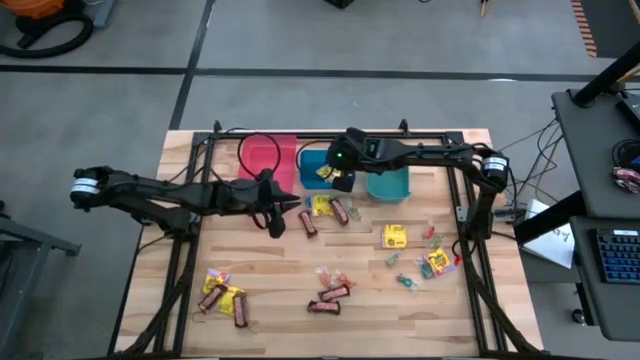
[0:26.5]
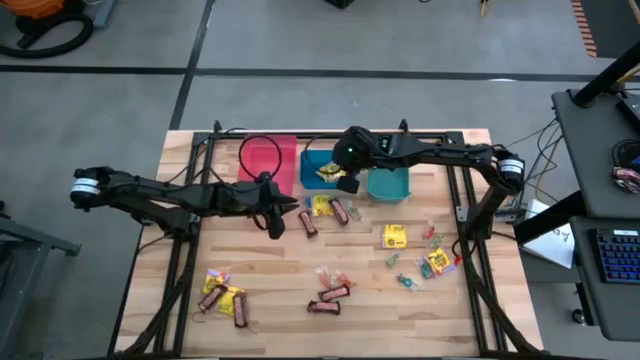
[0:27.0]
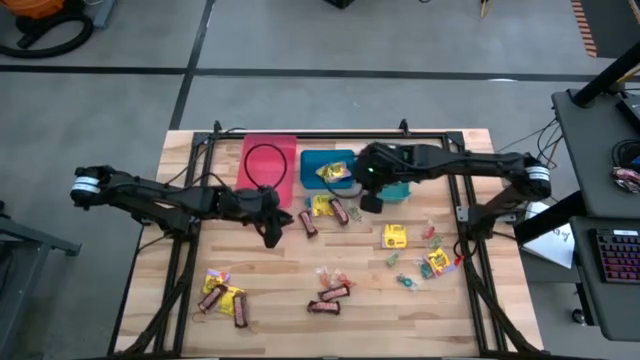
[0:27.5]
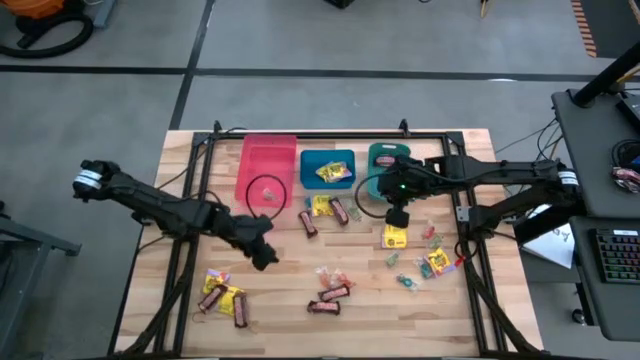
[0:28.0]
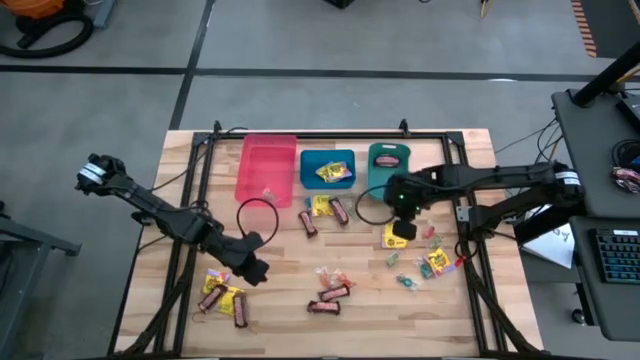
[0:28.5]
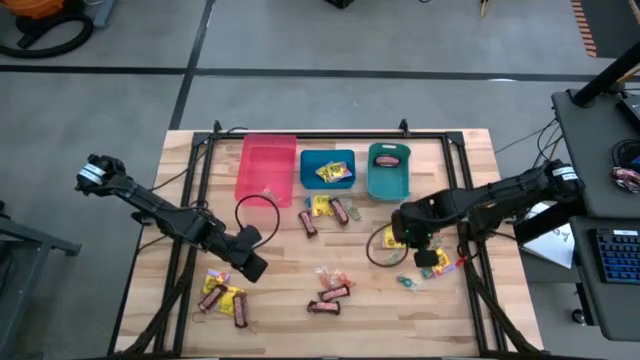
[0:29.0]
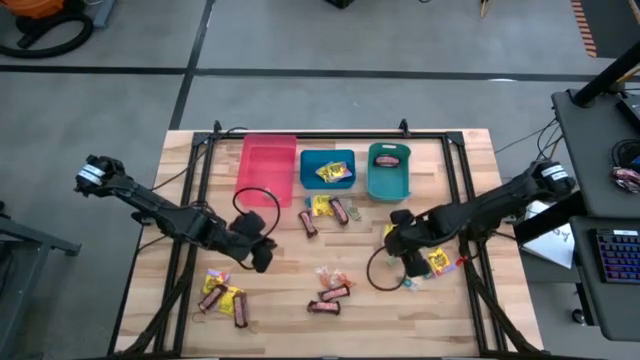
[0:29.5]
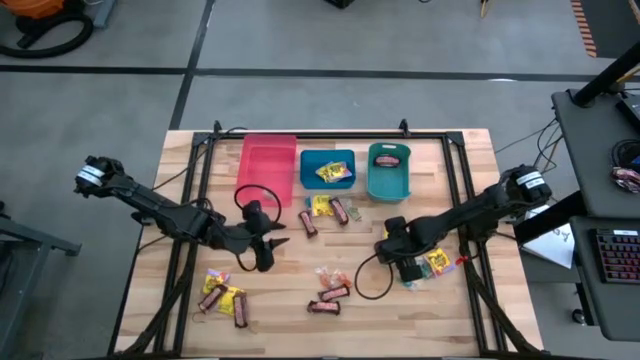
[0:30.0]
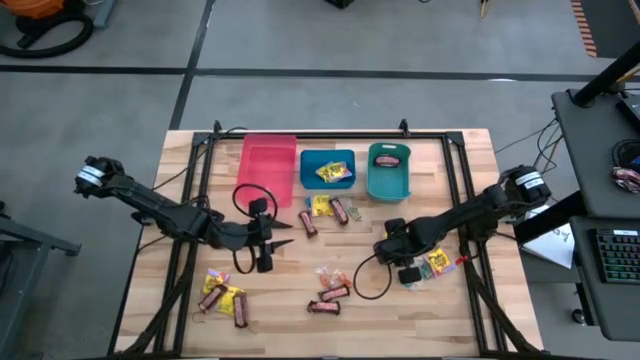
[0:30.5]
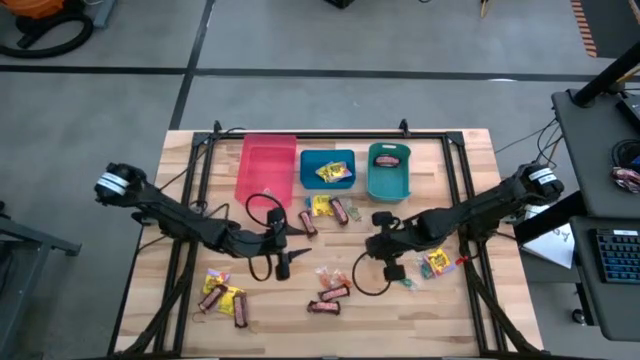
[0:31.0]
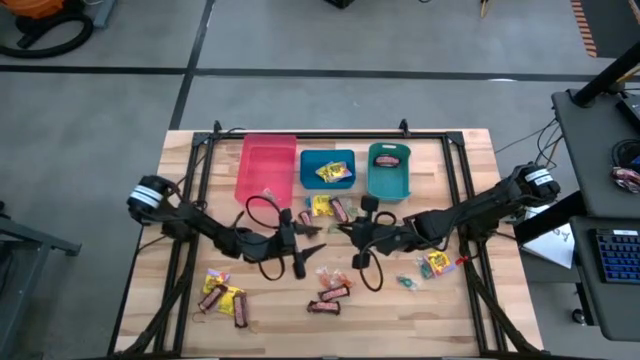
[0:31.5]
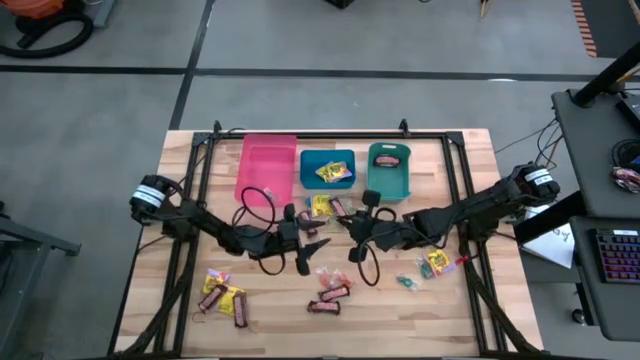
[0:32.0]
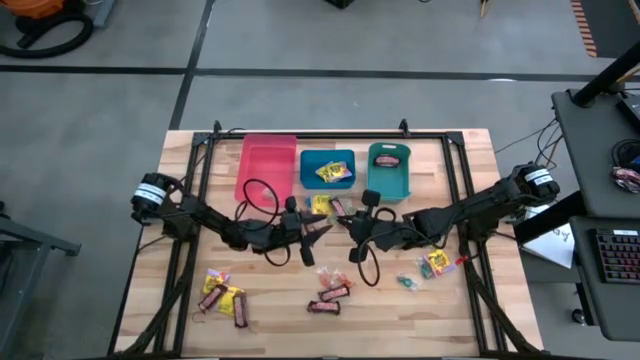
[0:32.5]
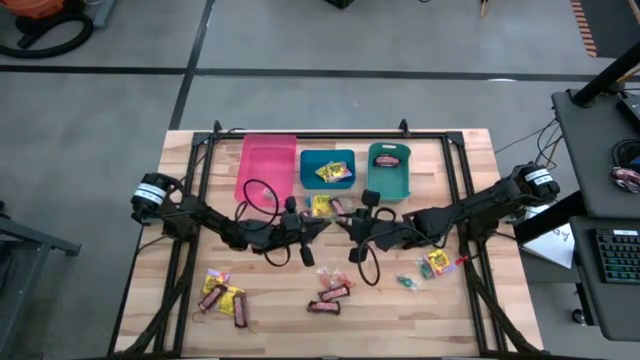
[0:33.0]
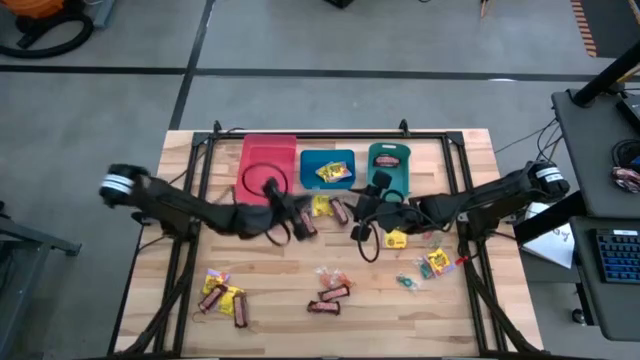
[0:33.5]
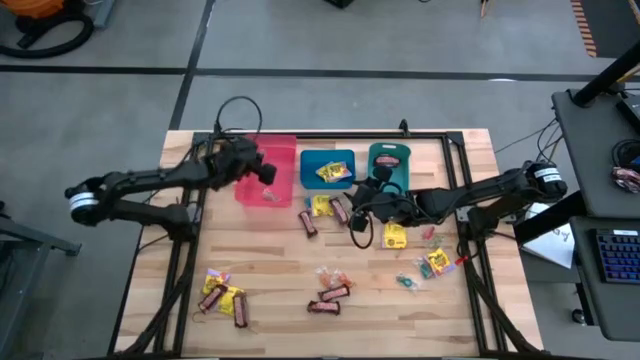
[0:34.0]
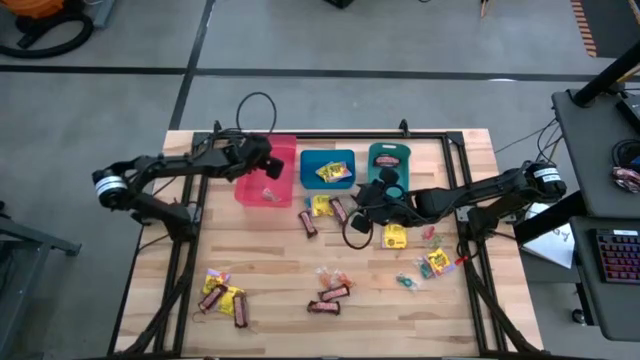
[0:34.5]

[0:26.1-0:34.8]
Task: Sort candy
Put the bottom left green candy into the red bin

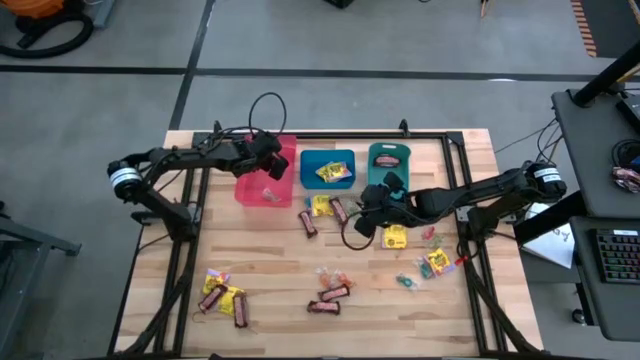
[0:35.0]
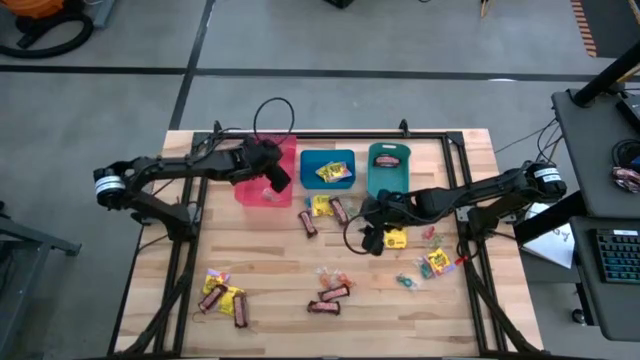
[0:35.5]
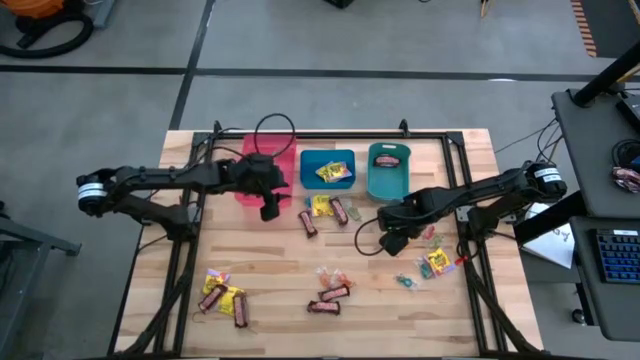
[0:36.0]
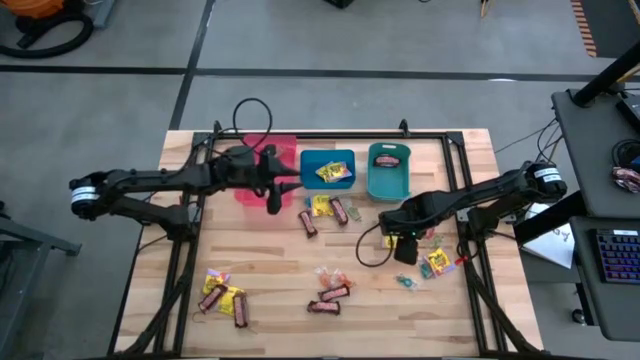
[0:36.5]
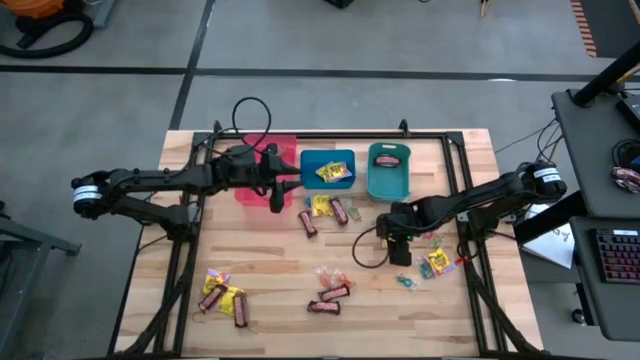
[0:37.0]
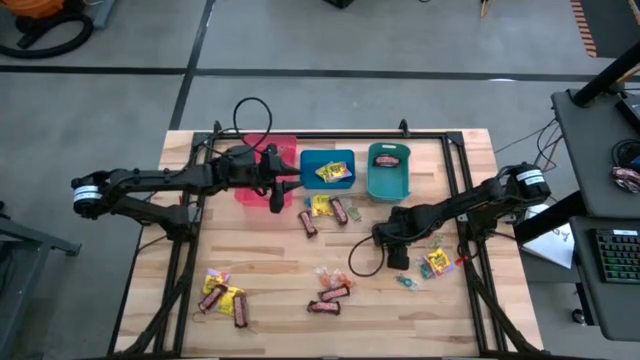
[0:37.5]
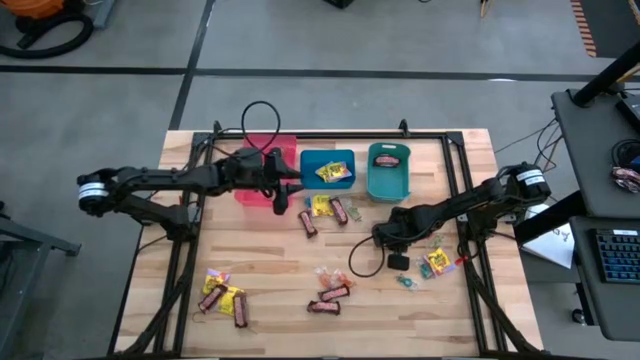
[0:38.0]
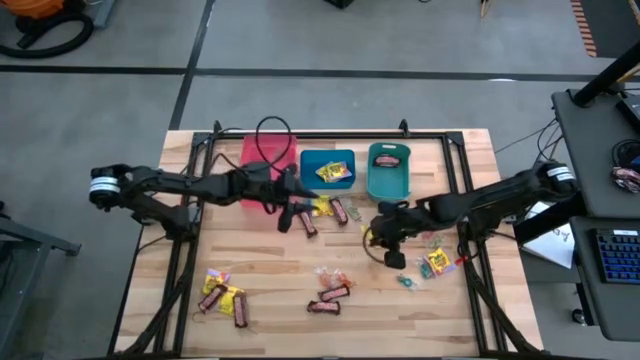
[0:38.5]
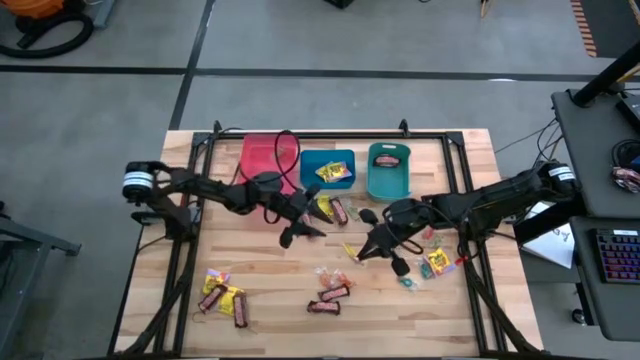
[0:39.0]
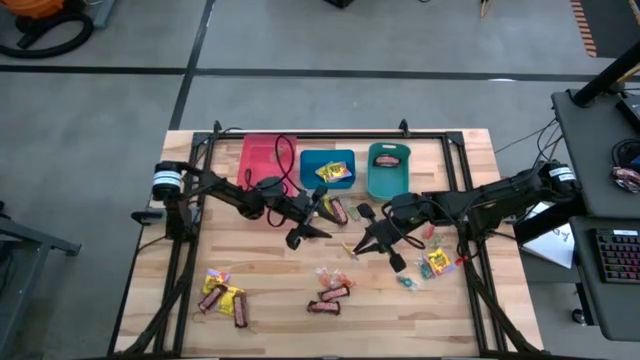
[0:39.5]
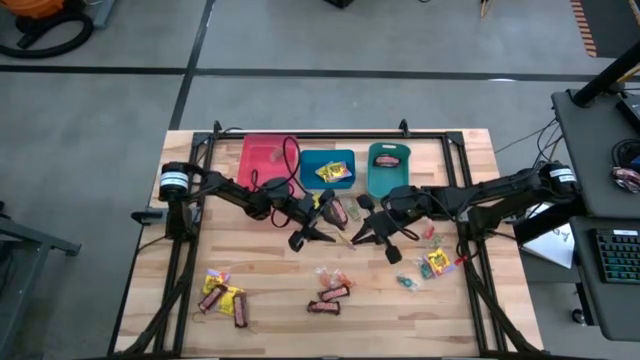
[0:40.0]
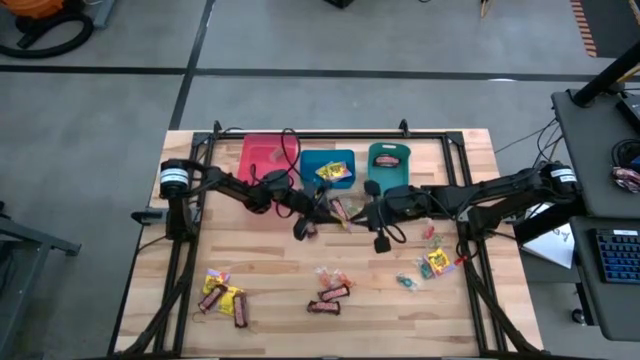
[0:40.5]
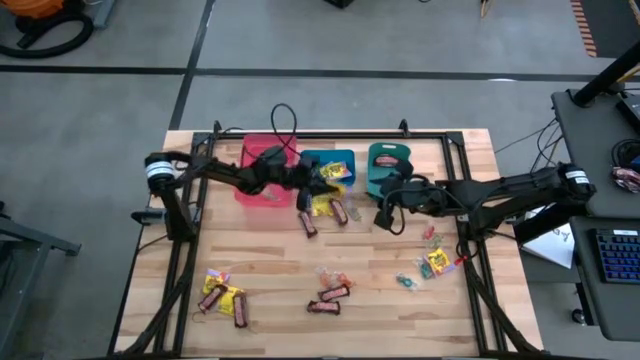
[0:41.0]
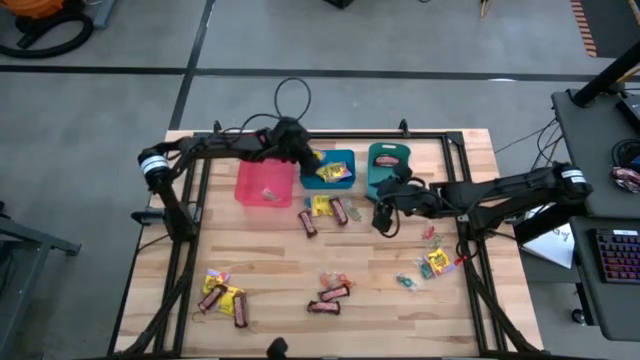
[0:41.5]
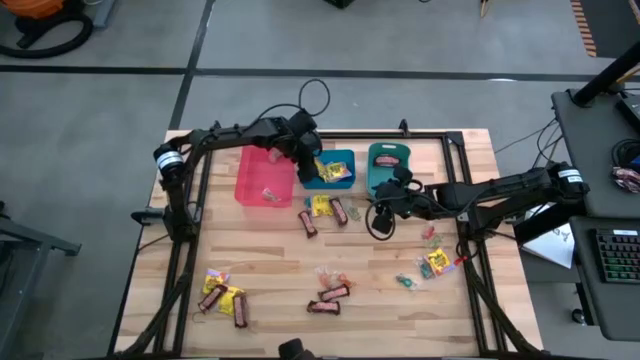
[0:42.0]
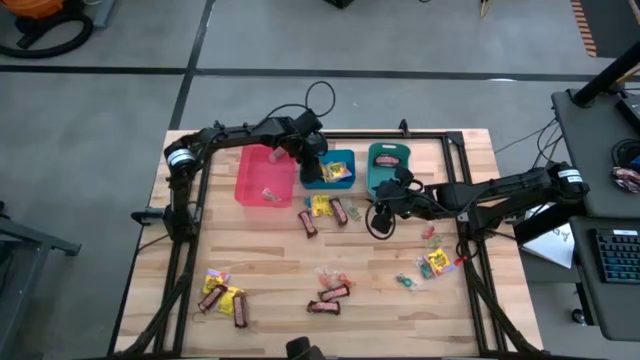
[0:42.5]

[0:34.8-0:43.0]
Put the yellow candy into the blue bin

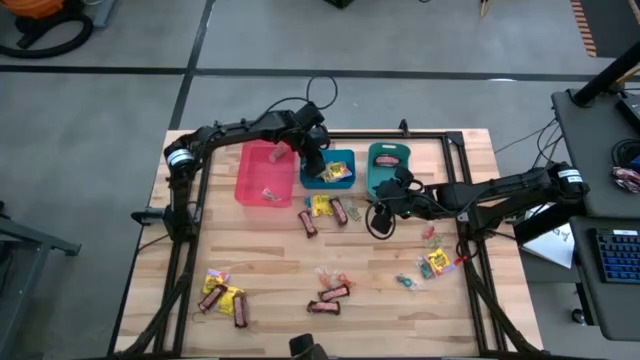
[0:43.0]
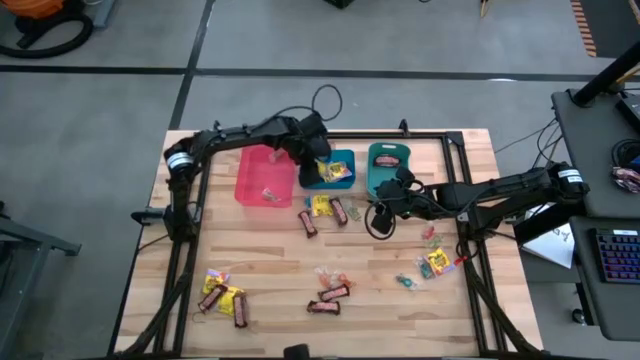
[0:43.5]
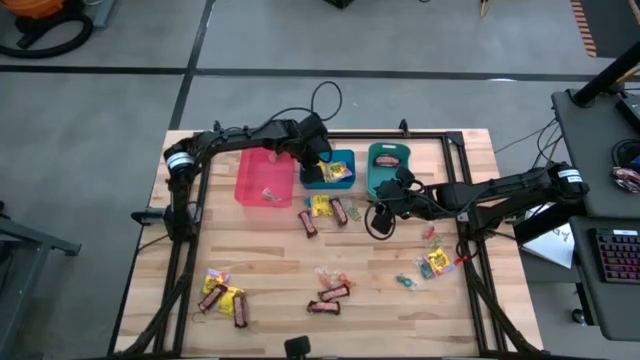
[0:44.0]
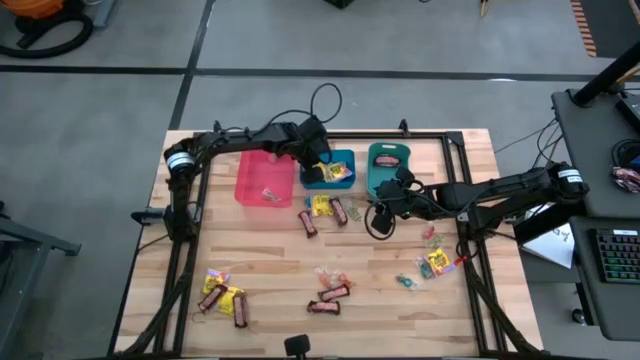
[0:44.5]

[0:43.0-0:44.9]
Put the yellow candy into the blue bin

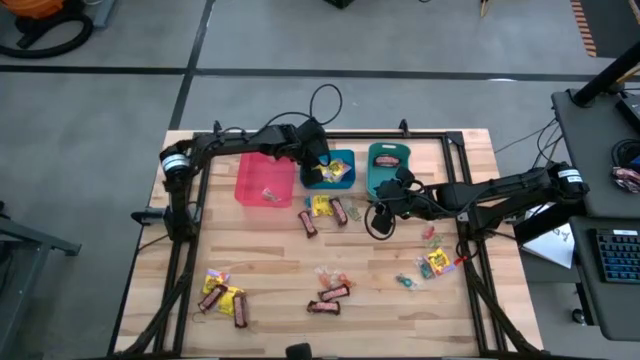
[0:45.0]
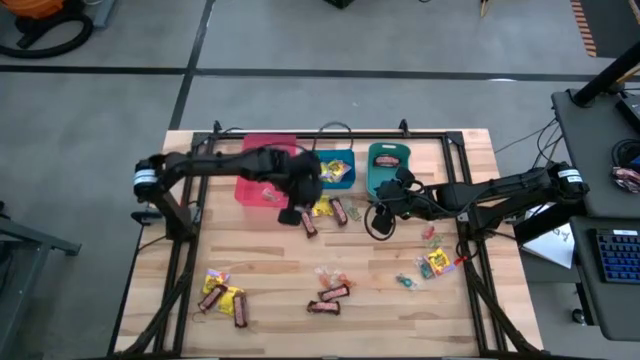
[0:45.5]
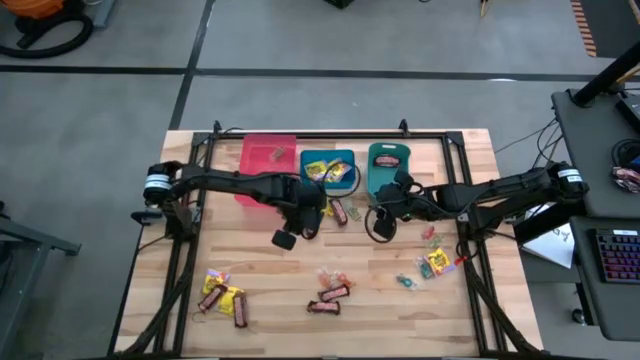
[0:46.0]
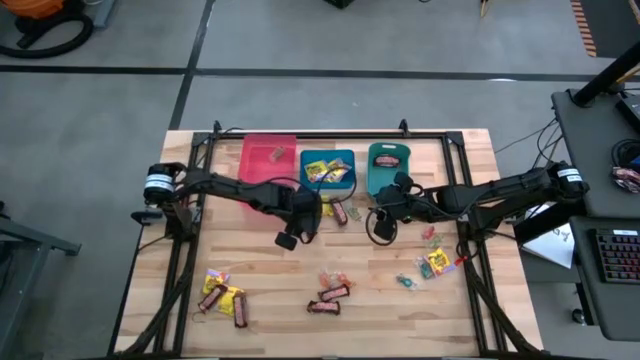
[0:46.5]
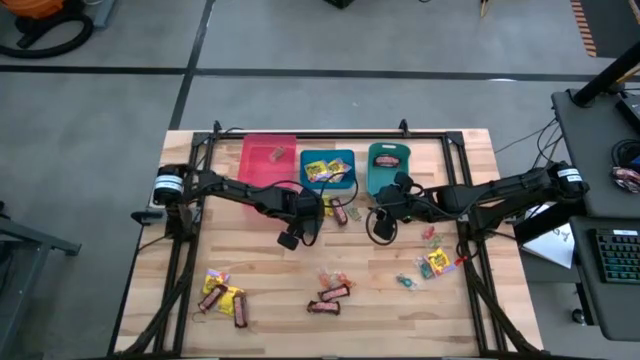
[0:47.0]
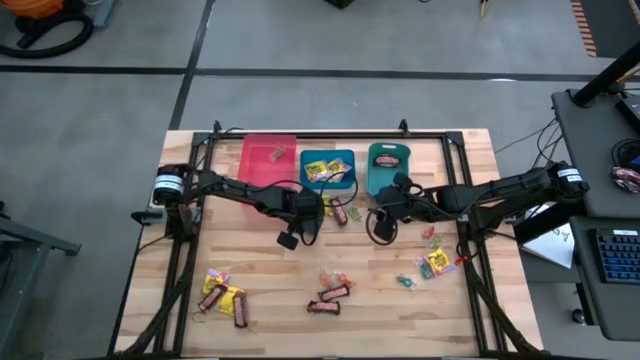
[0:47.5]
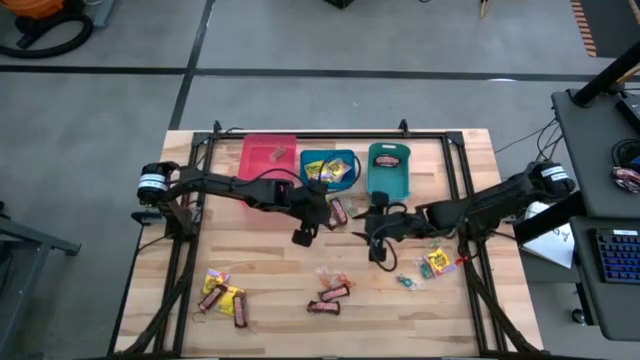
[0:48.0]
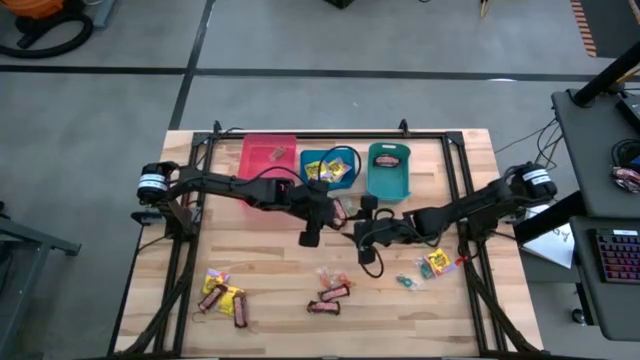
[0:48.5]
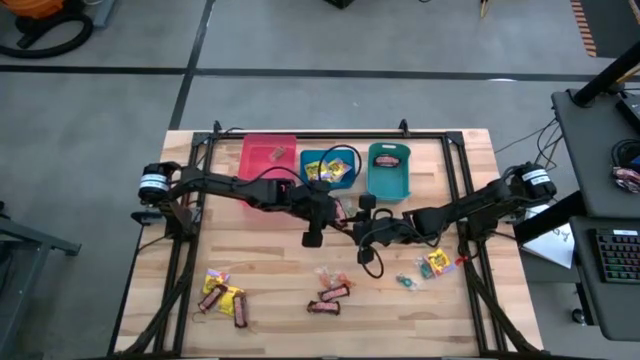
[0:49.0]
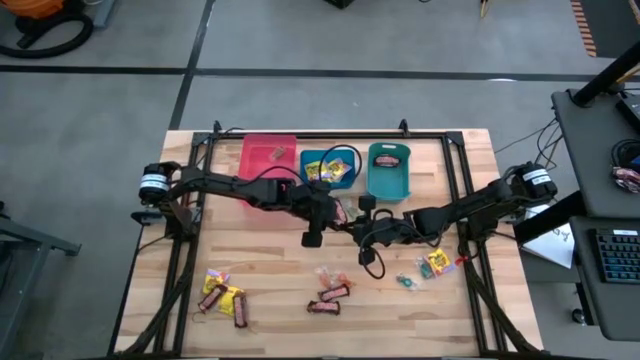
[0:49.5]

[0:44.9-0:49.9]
Put the brown candy into a green bin
